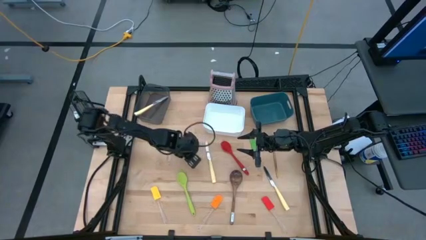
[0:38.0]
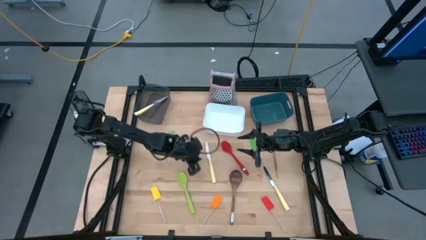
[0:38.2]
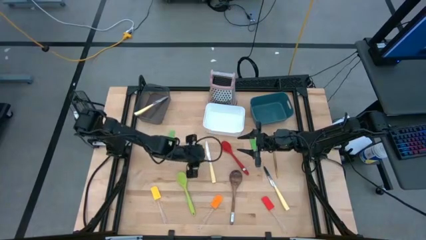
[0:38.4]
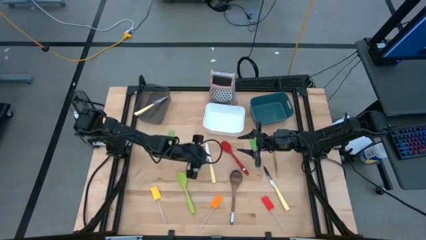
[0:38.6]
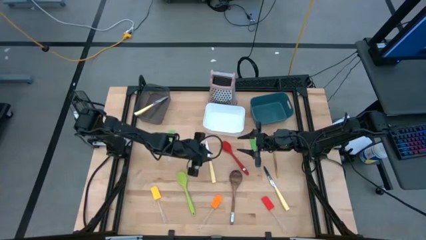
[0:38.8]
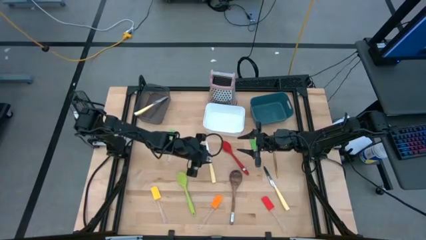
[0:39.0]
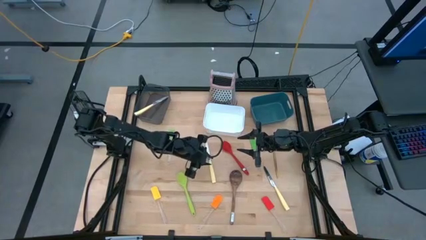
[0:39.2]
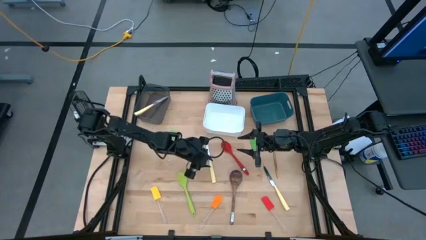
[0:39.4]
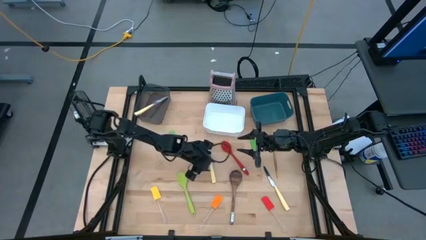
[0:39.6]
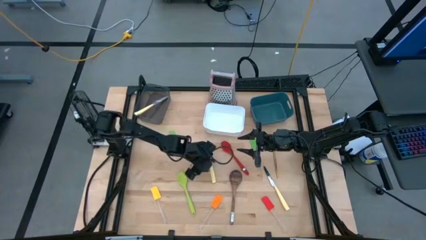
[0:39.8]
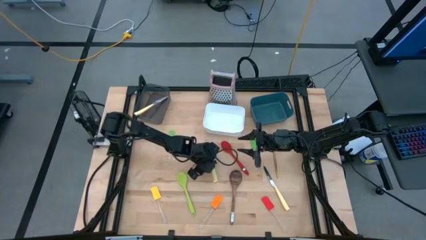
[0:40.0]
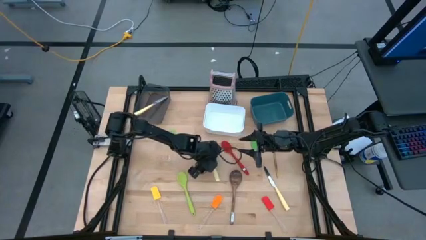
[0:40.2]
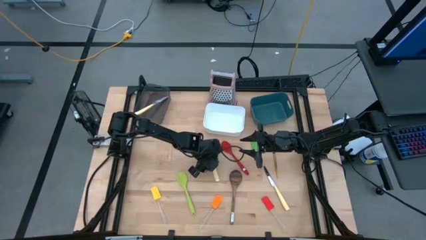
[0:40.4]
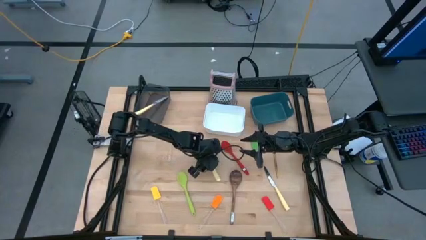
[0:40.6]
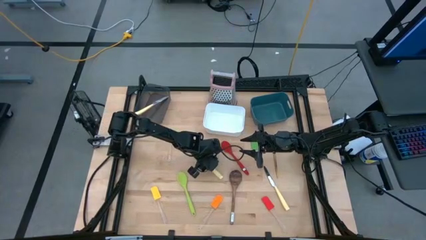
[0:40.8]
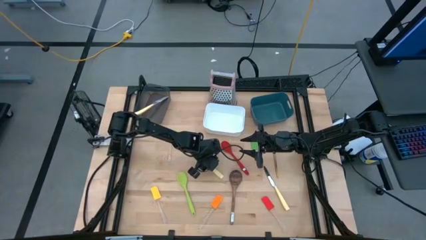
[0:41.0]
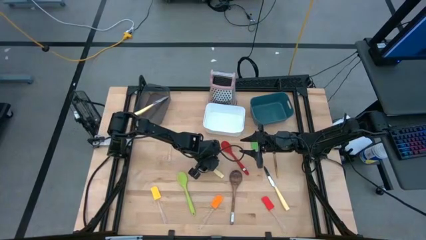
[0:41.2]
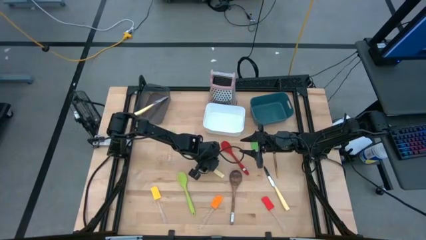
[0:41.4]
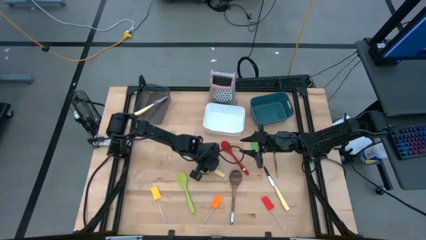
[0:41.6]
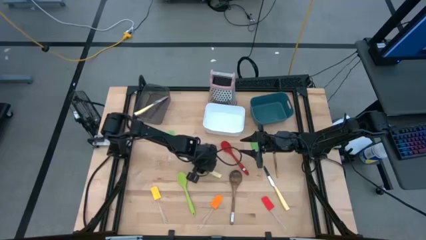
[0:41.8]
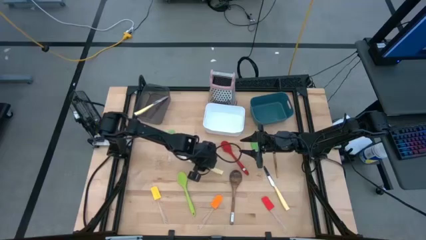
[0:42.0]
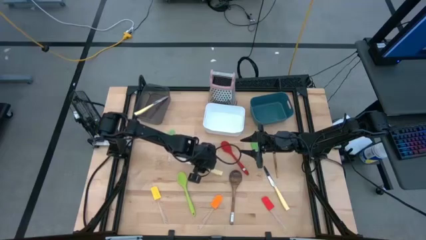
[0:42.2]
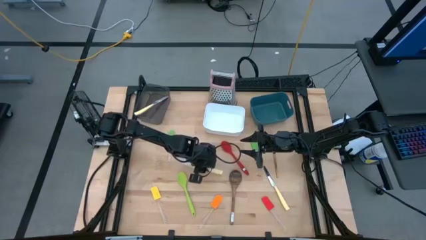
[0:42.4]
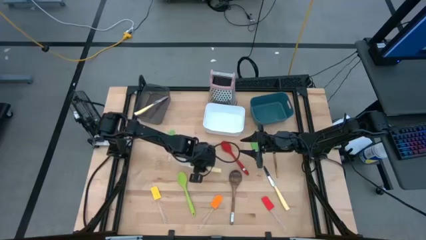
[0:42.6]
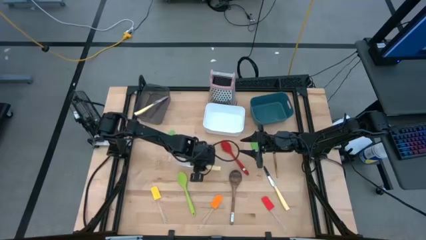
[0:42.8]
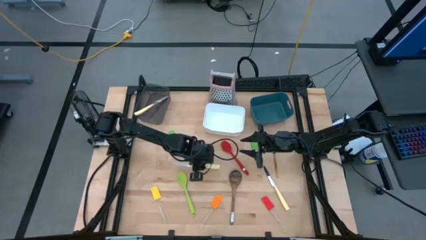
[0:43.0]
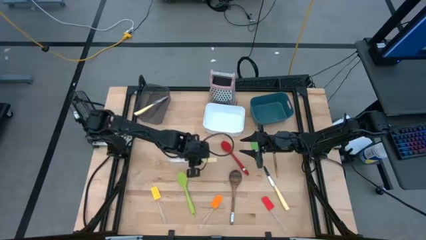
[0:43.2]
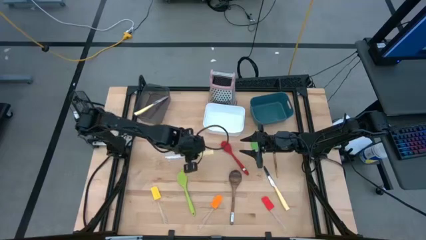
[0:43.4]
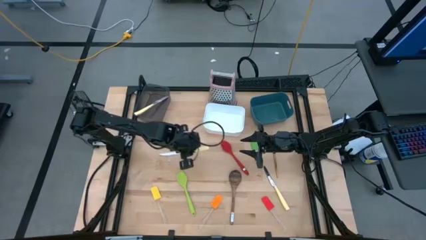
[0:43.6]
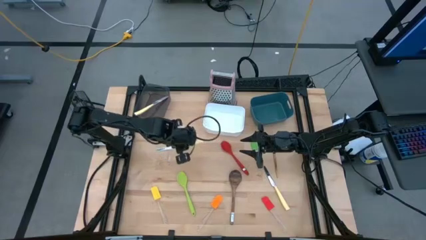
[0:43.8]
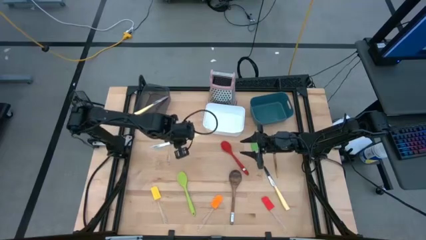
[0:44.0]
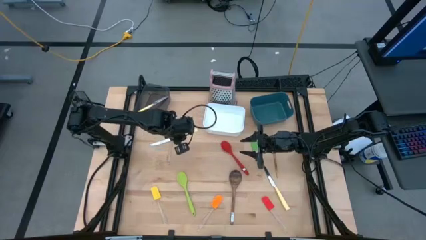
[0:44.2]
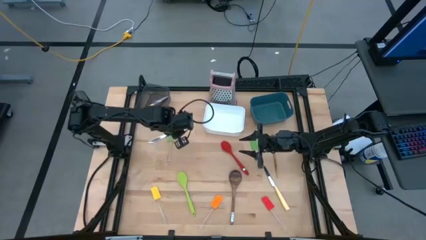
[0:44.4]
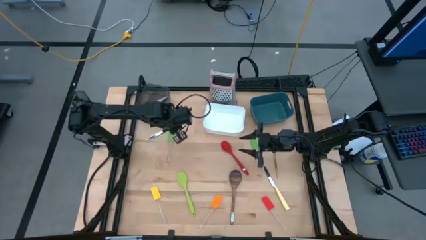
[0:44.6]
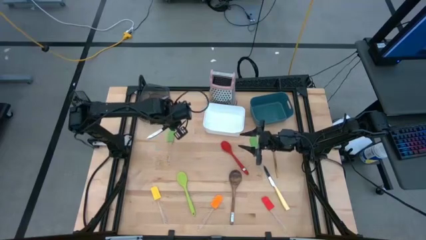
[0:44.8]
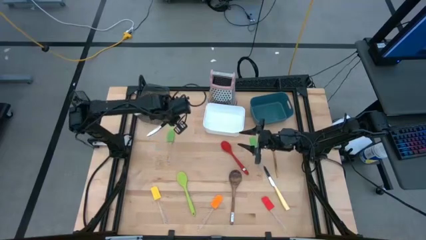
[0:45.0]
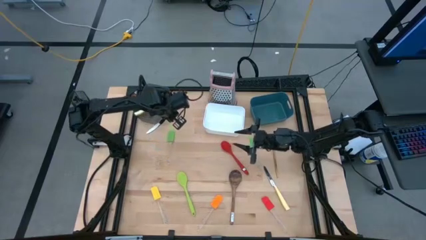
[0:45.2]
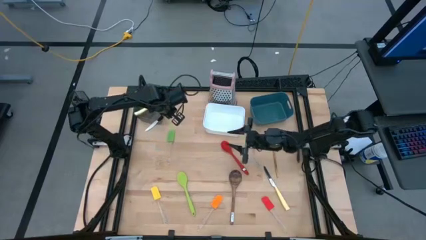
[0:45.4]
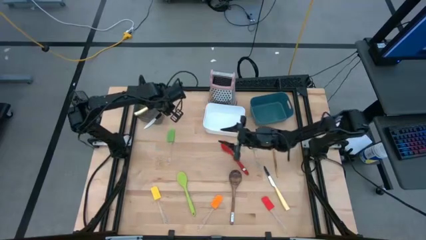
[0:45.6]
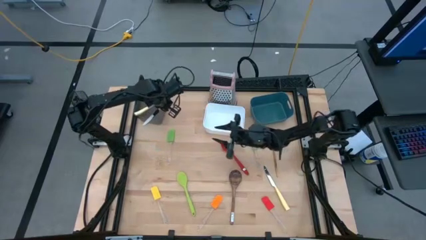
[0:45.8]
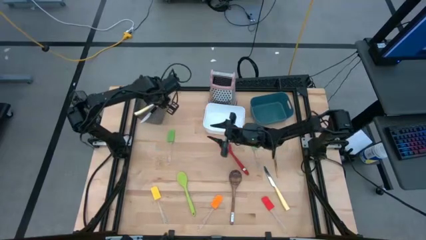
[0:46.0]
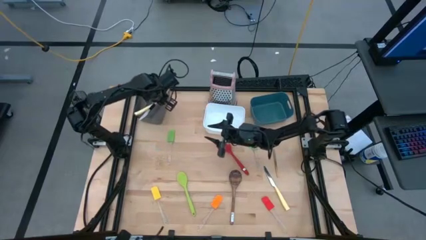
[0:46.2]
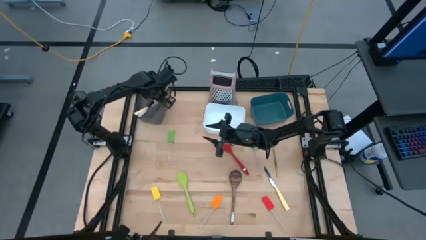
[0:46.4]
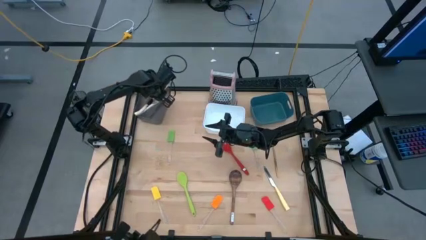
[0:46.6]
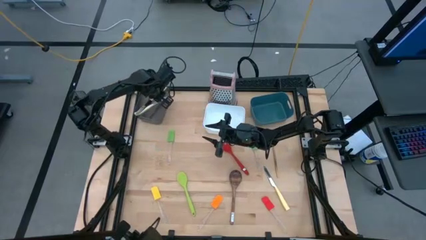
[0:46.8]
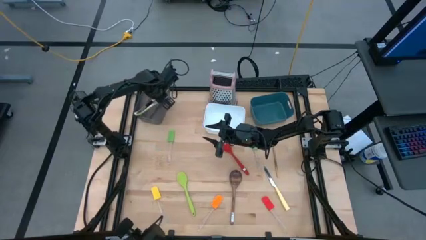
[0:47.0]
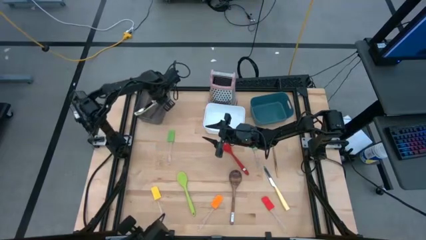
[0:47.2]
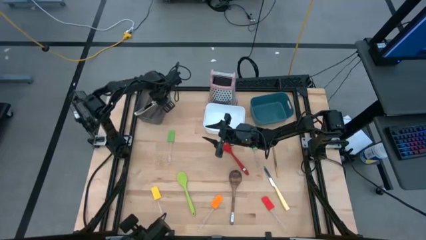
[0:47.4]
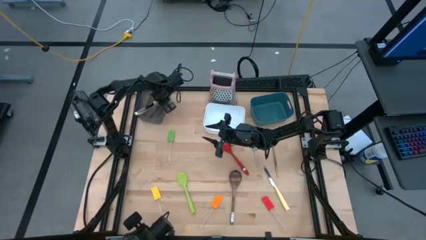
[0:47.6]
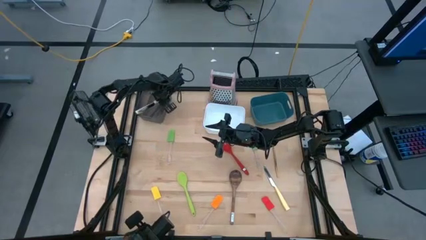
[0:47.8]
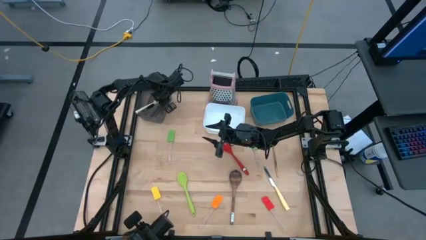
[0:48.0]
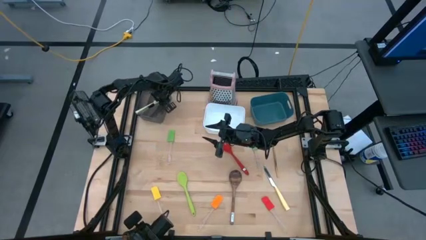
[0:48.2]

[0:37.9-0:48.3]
Task: Pick & Place Kitchen Items
Put the top yellow knife into the black bin

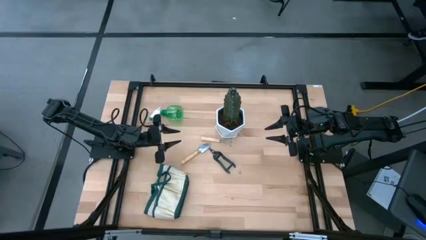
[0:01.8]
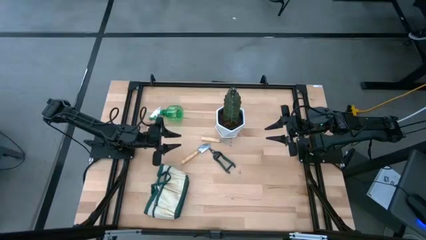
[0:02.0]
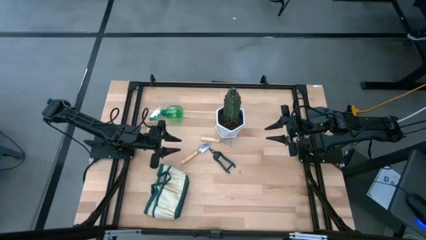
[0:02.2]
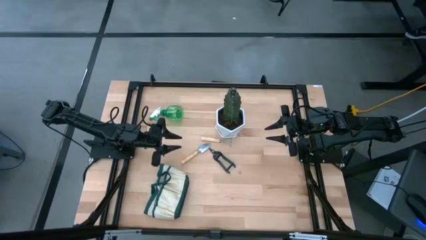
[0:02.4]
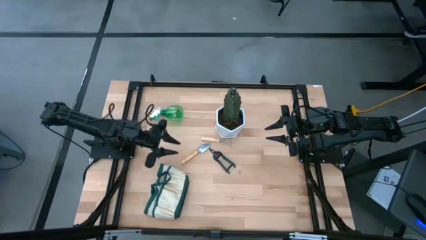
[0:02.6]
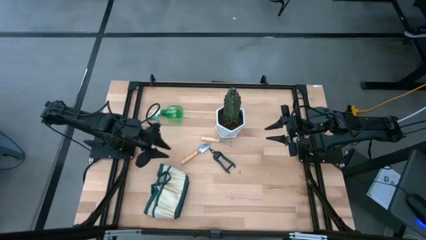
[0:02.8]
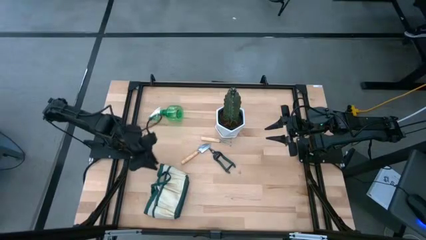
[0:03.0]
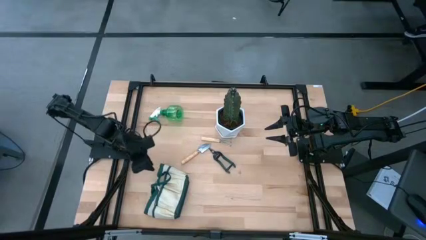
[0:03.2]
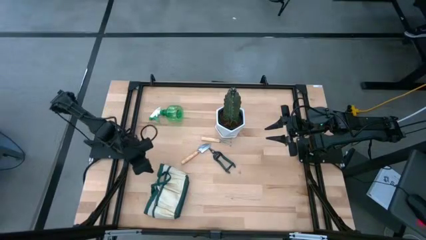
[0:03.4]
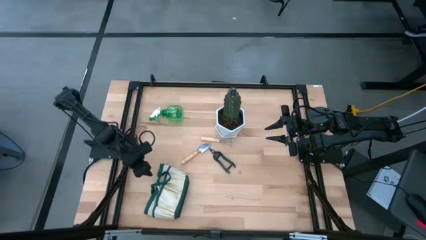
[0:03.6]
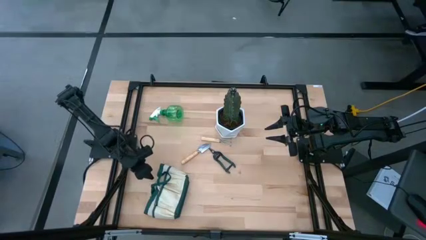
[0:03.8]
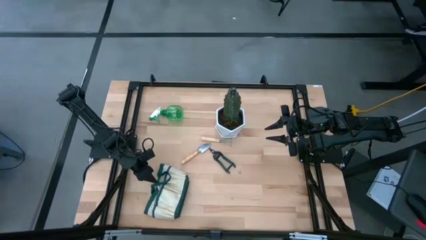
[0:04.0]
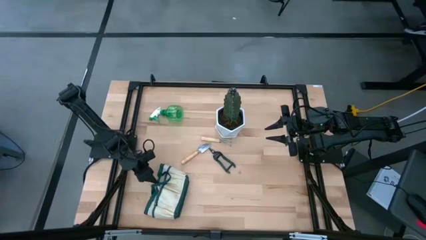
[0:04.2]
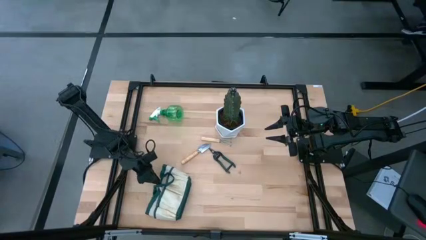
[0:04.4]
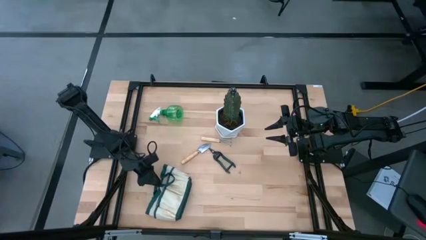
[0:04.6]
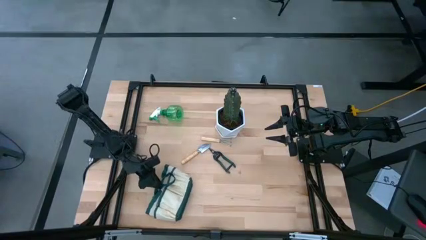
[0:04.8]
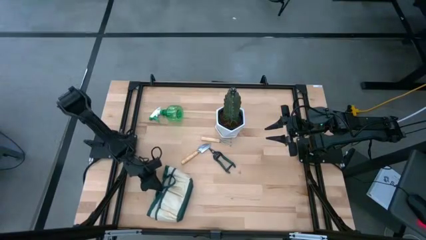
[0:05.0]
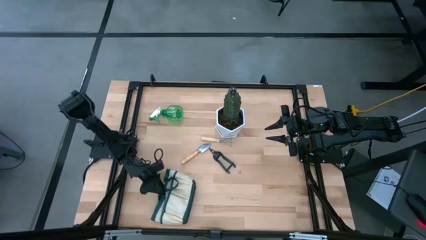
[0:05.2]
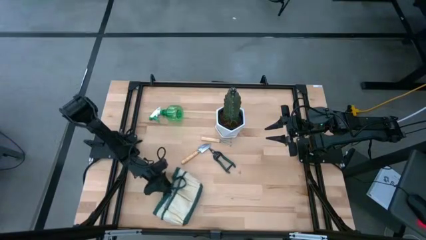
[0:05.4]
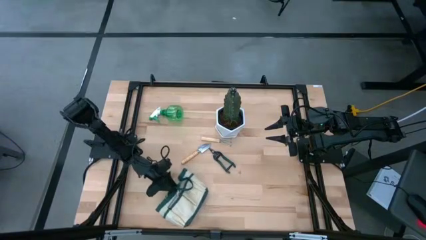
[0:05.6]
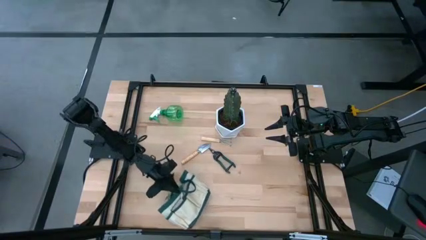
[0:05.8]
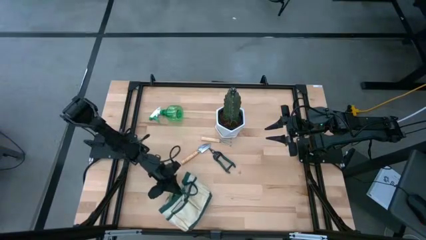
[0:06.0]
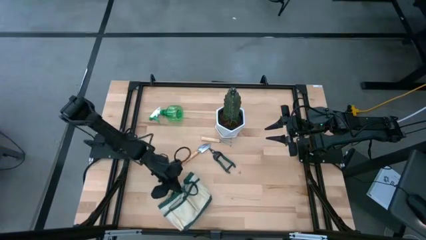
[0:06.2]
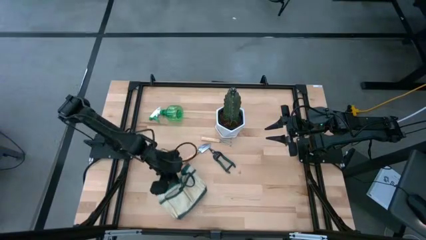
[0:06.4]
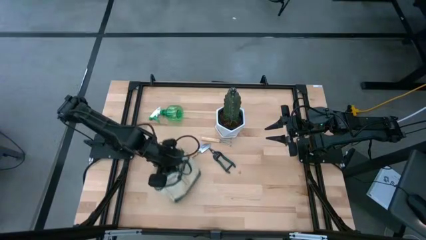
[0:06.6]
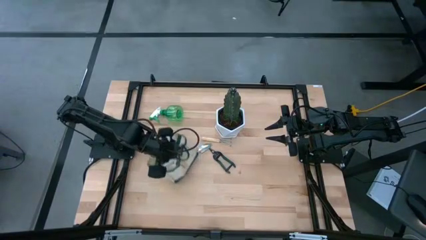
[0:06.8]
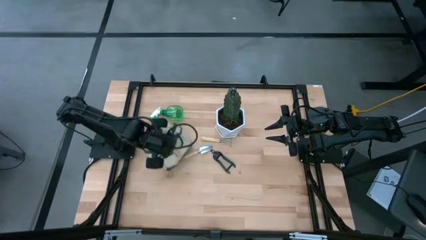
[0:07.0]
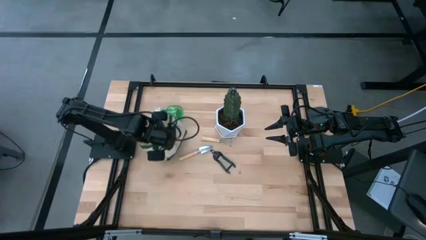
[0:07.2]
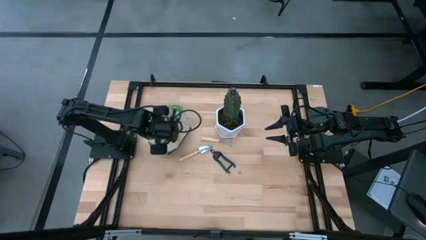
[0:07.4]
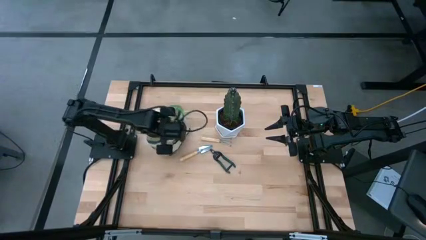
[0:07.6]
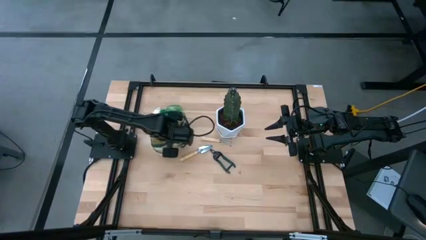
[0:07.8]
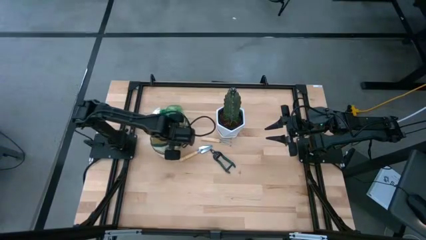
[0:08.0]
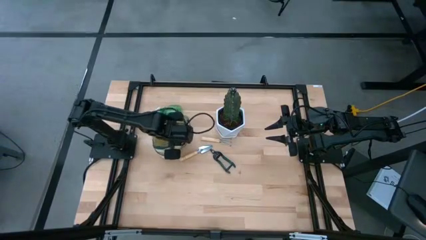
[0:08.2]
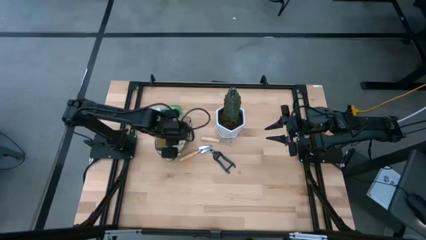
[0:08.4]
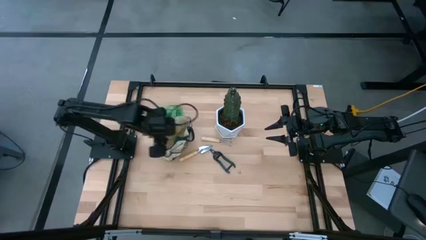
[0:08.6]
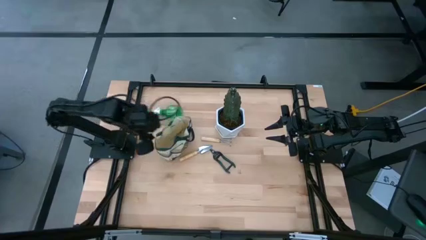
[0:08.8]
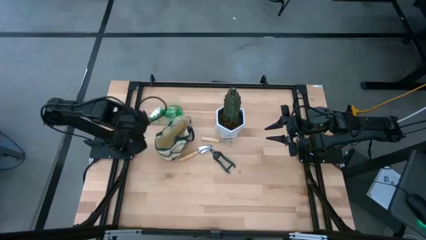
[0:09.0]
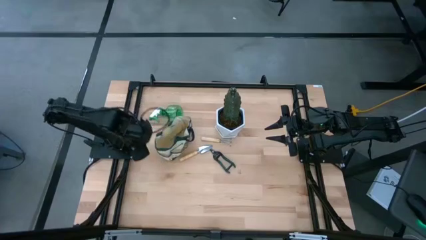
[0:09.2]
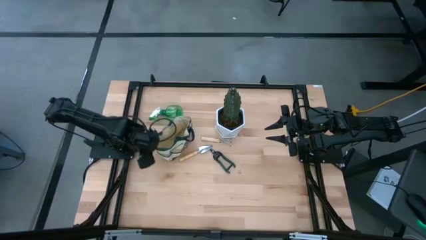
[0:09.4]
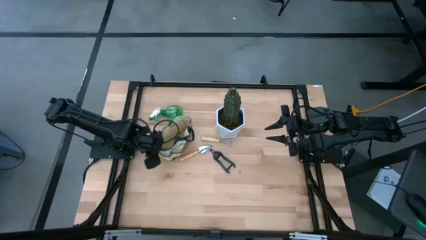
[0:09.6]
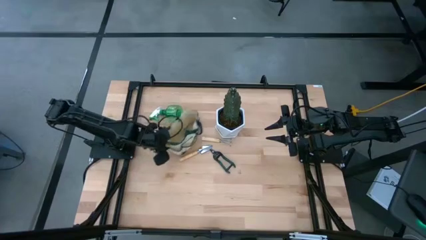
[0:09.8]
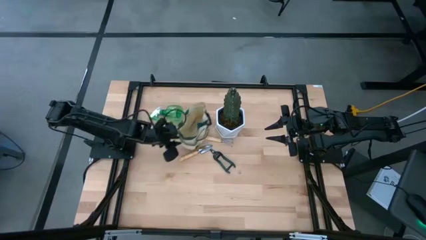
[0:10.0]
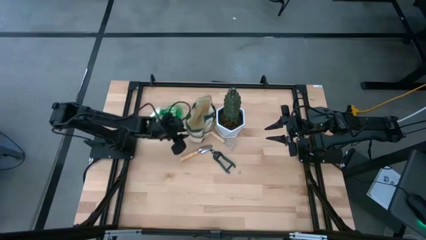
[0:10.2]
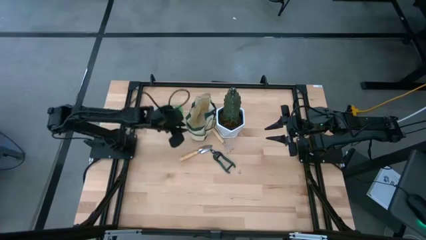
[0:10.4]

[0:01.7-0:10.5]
Task: Pick & Place Garden tools in Gardening bag
Adjust the brown gardening bag
